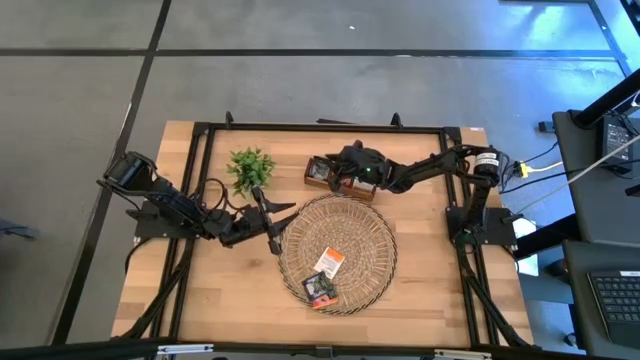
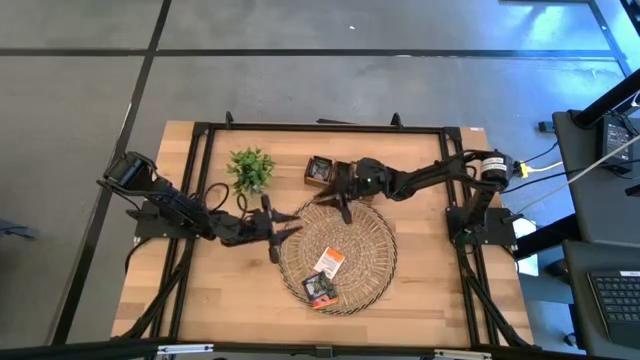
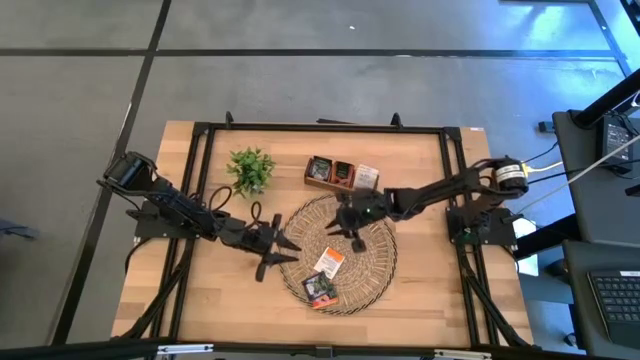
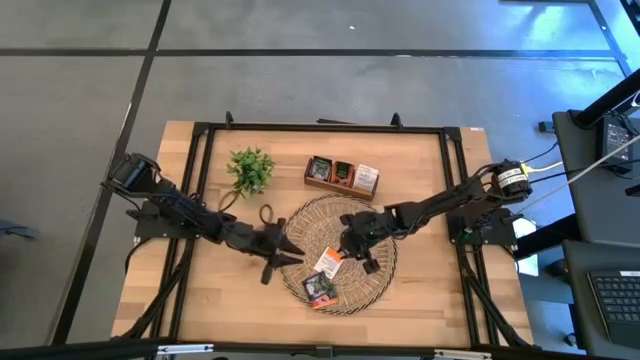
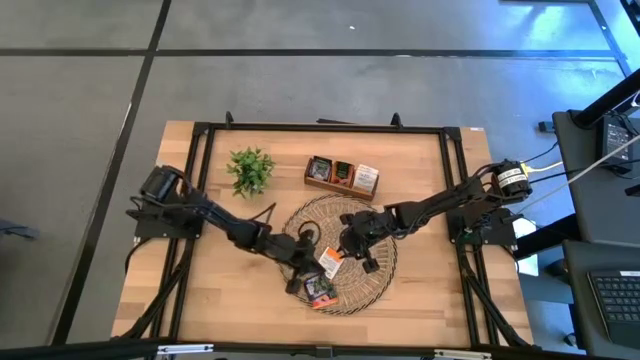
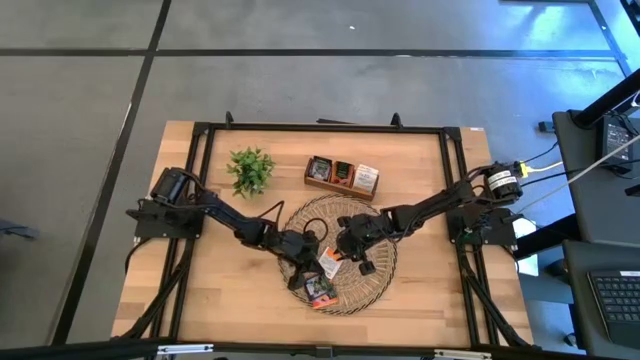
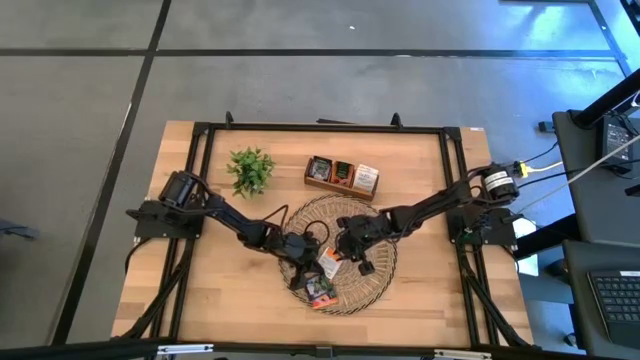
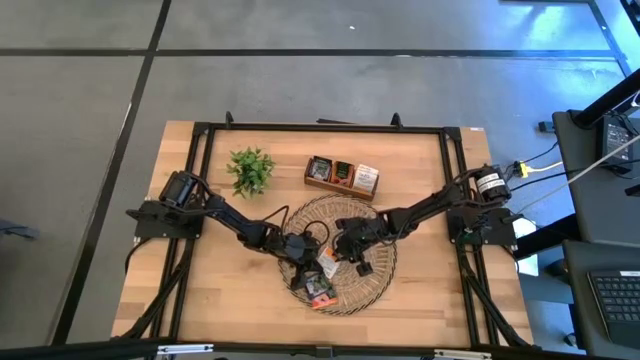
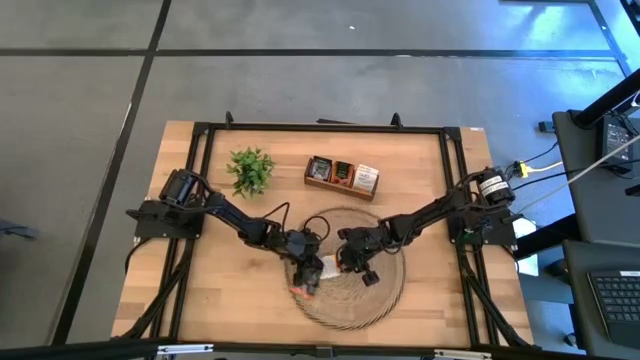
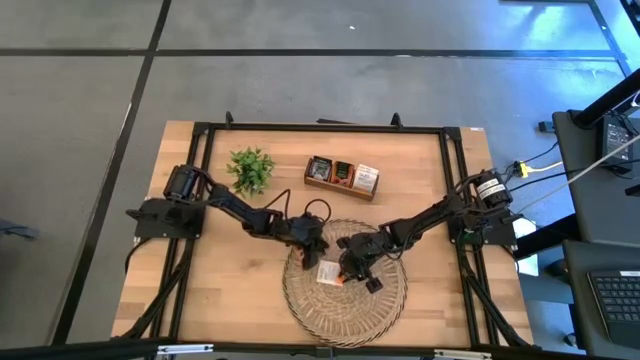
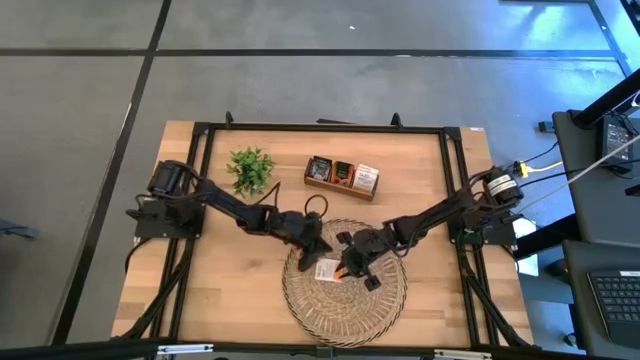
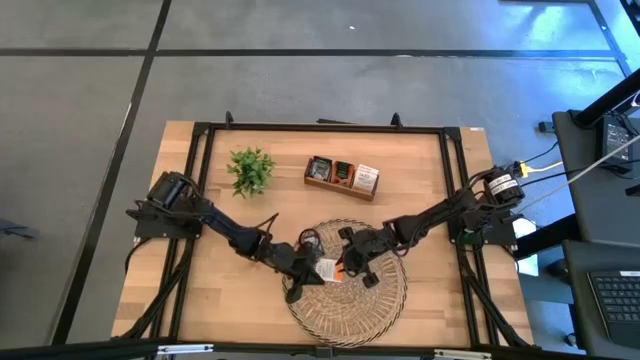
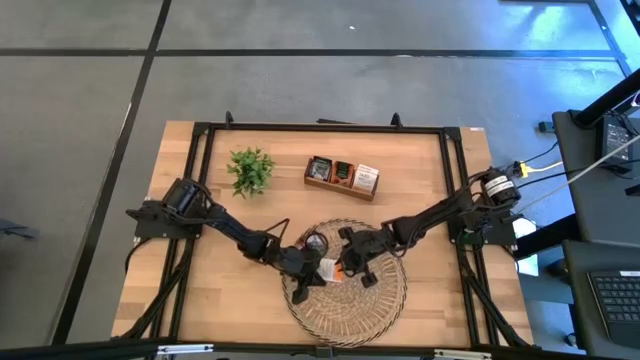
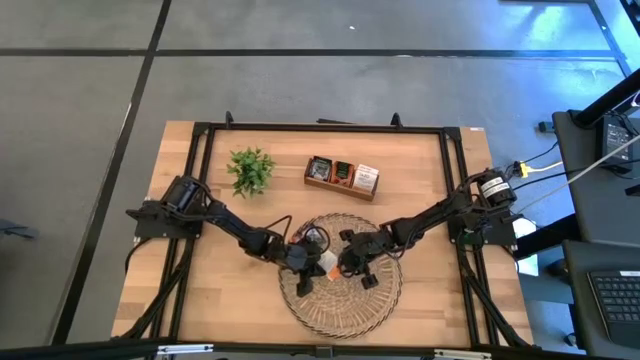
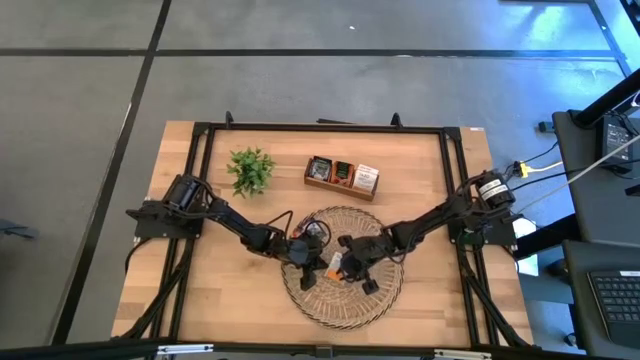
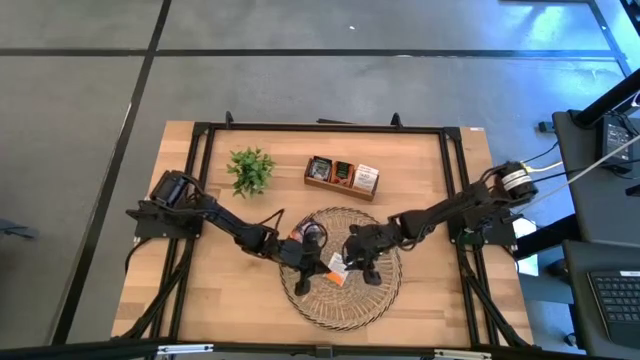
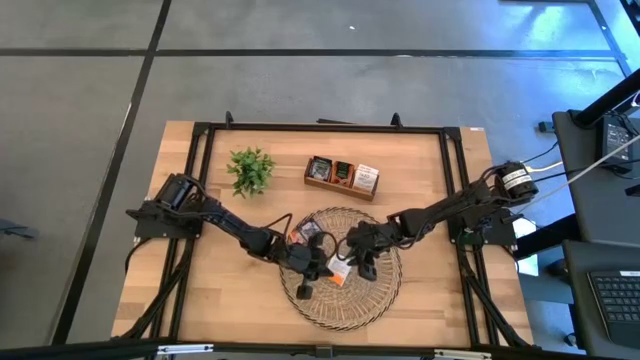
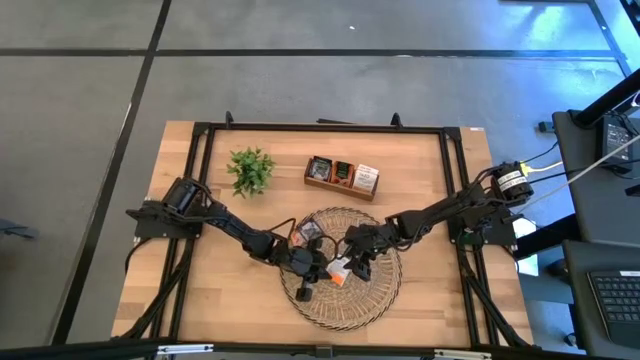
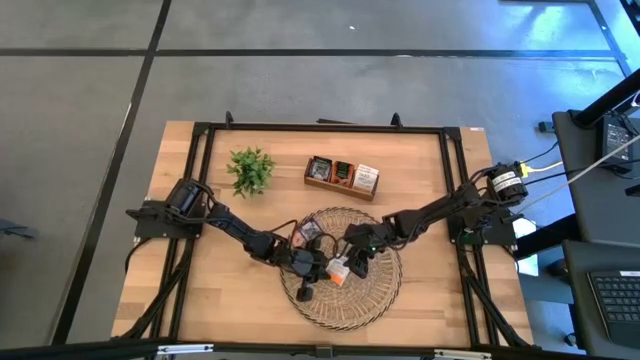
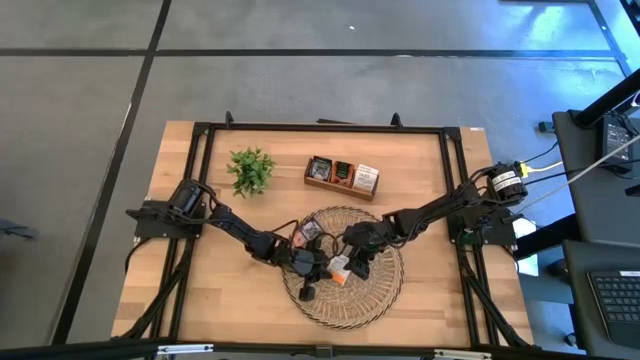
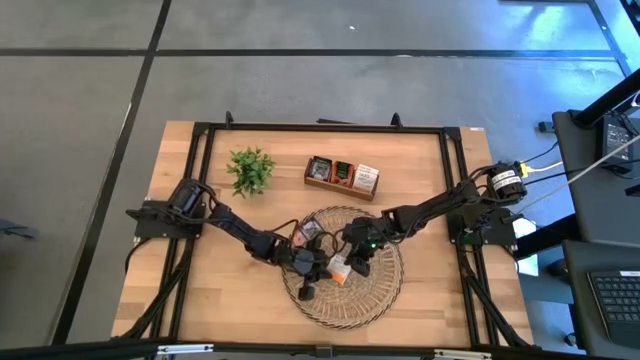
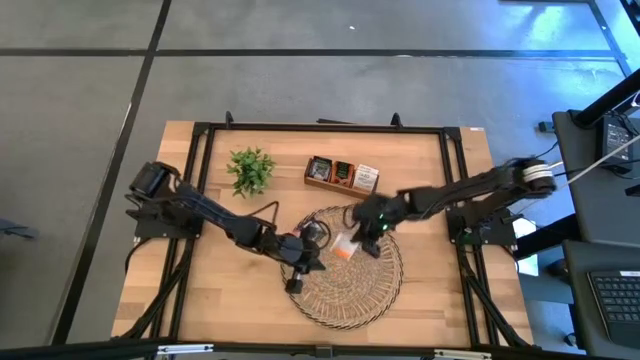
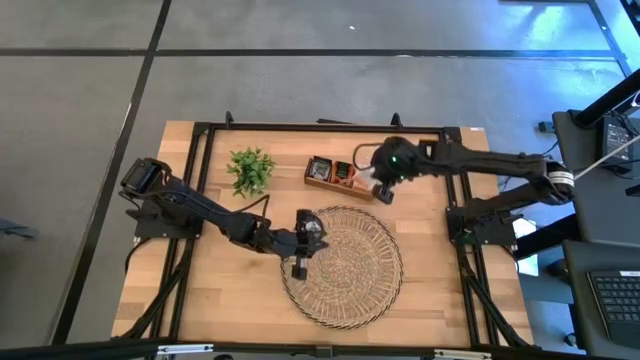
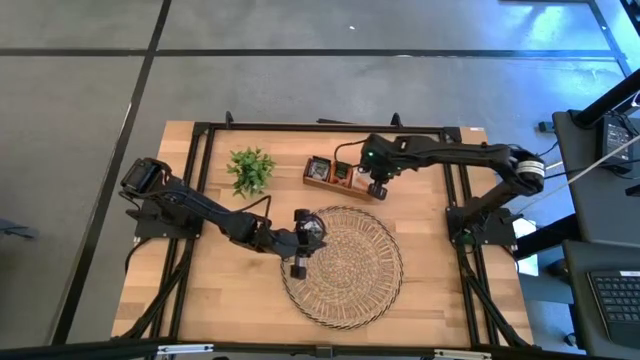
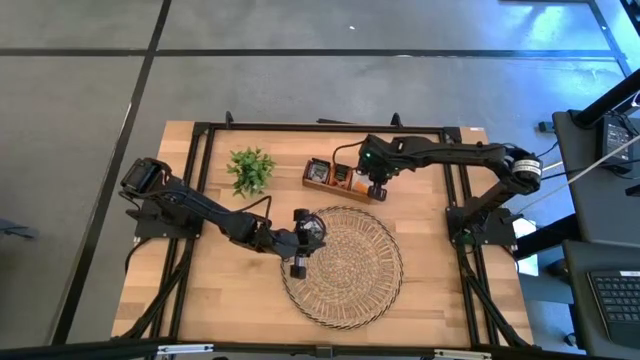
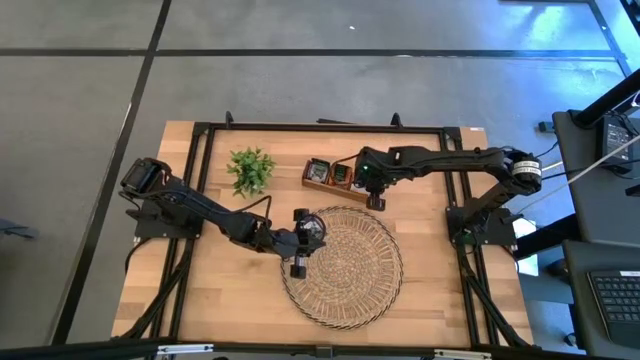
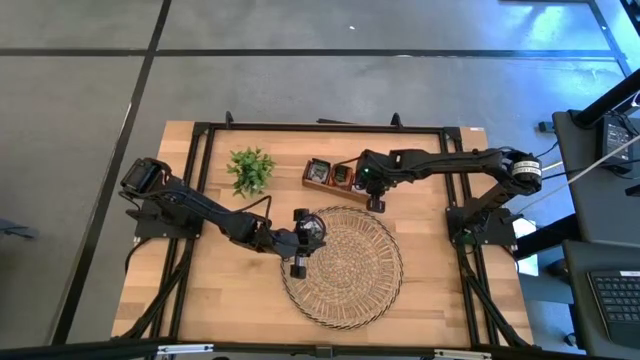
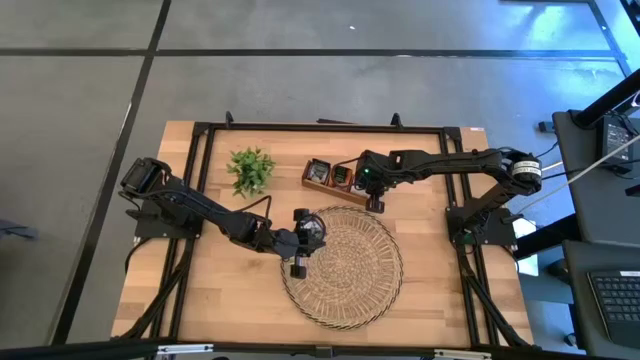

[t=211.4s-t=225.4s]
Task: Pick & Place Tea
Put the white and orange tea bag into the right section of the wooden organizer

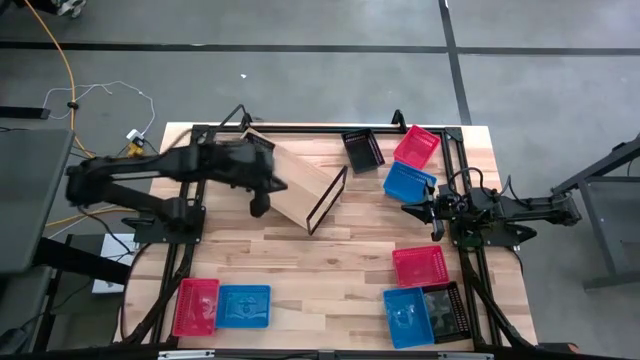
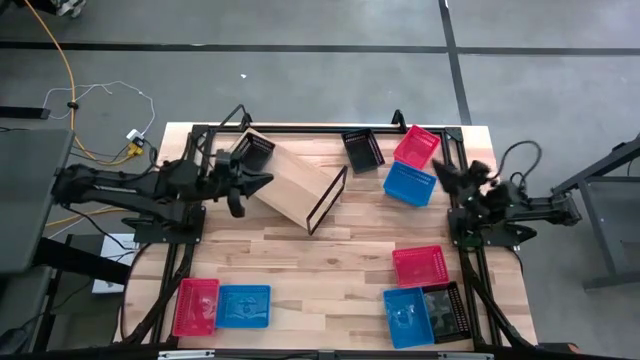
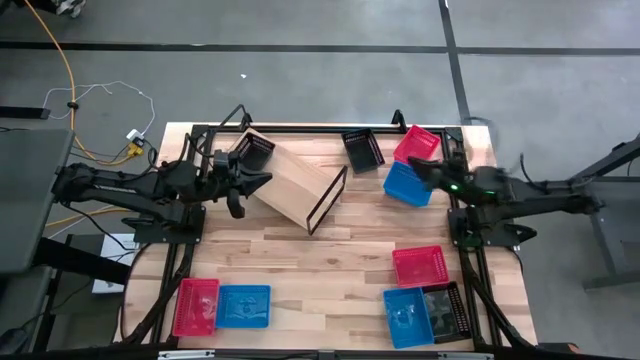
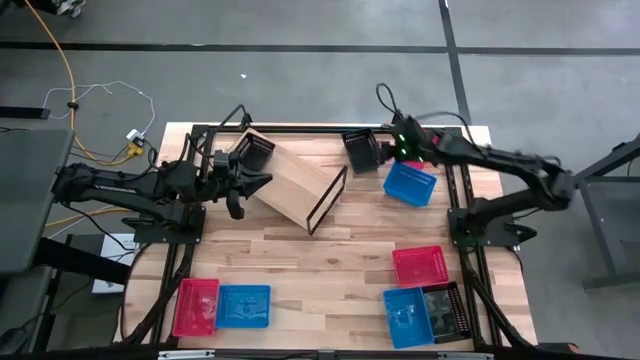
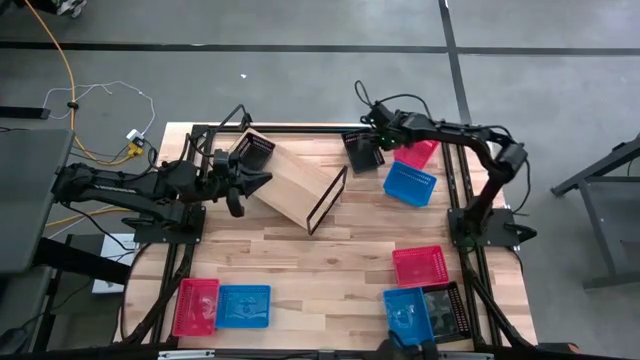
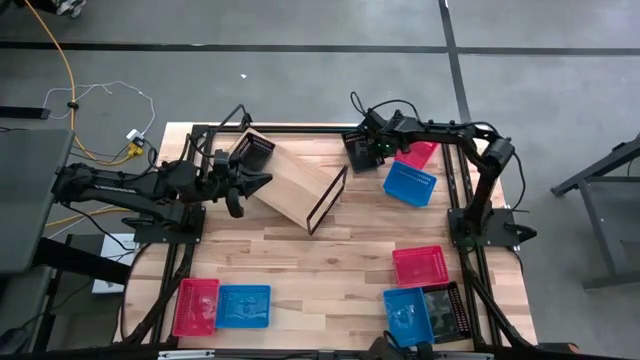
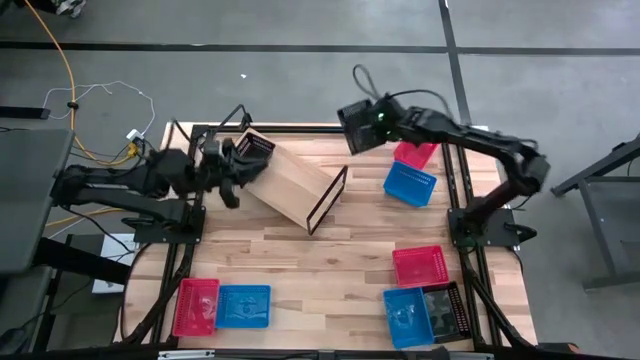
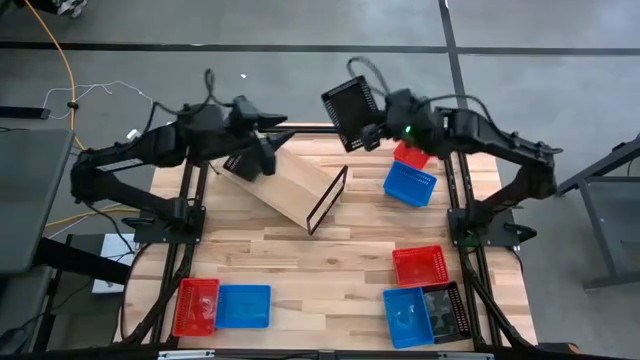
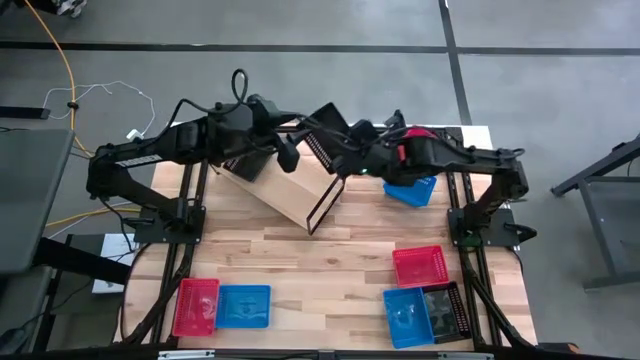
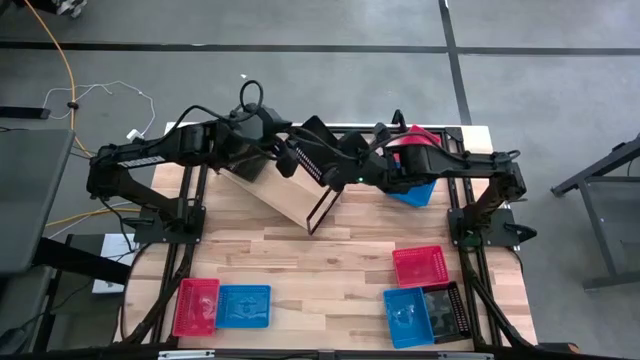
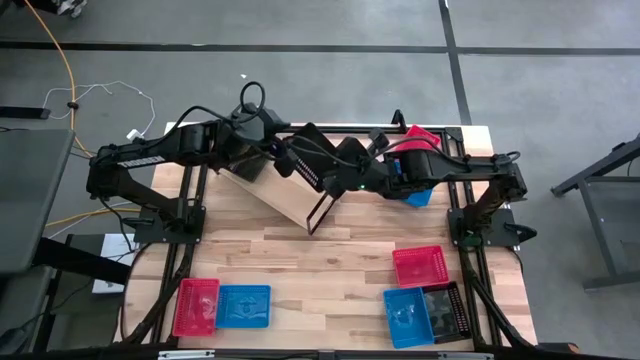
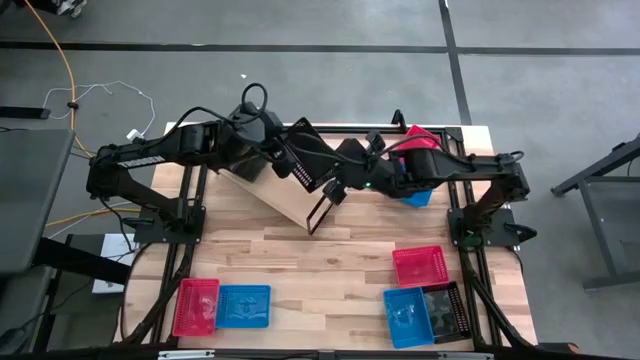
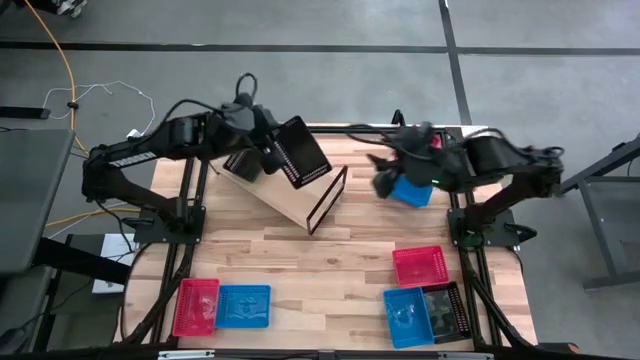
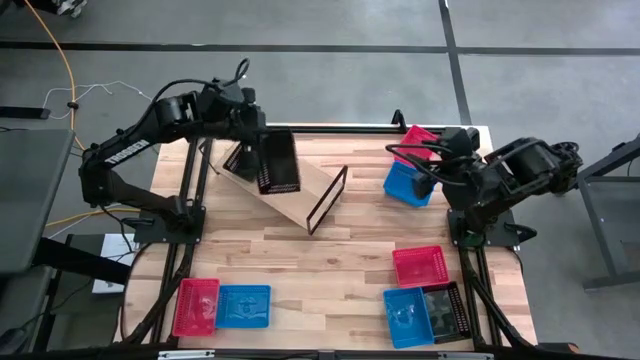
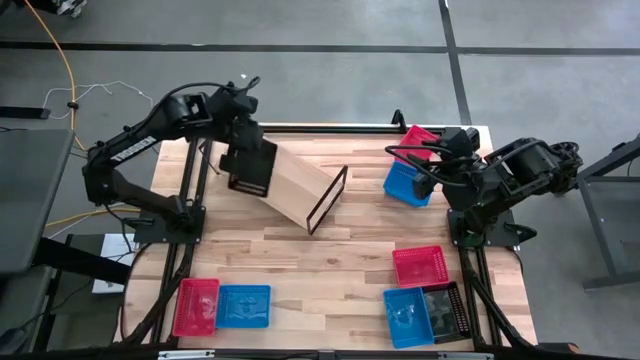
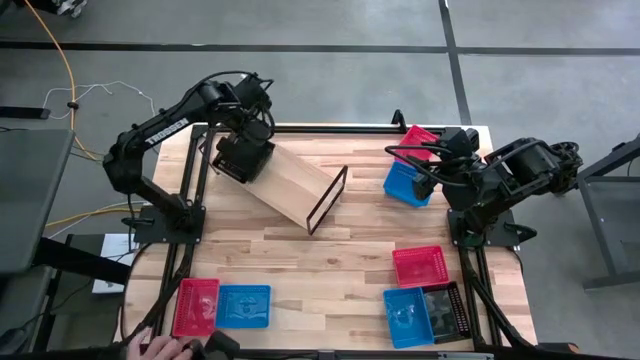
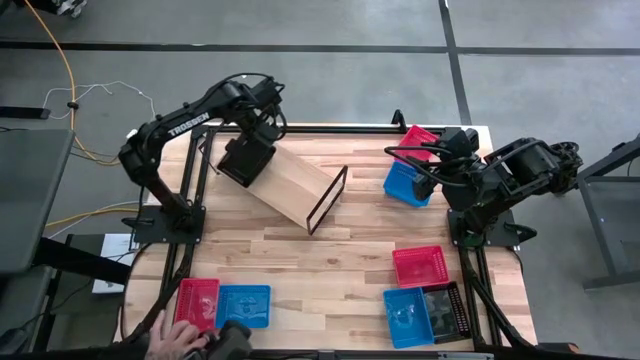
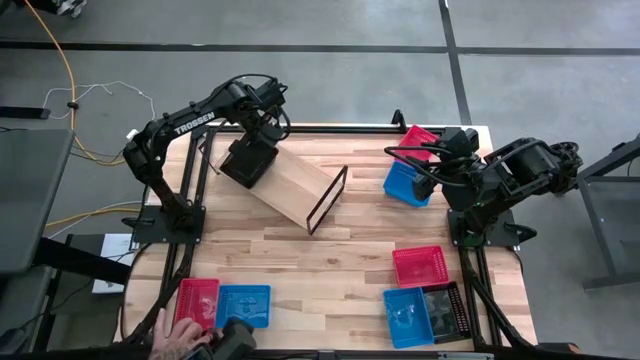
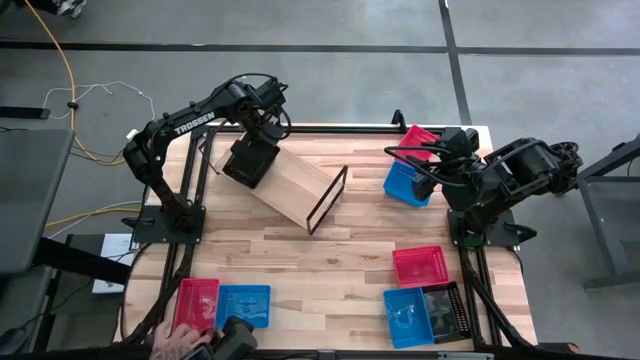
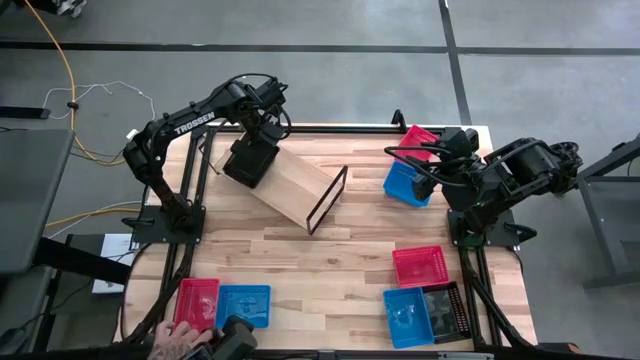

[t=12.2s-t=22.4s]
Task: Stack baskets on shelf by color
Stack the top black bin into the black bin on the shelf
